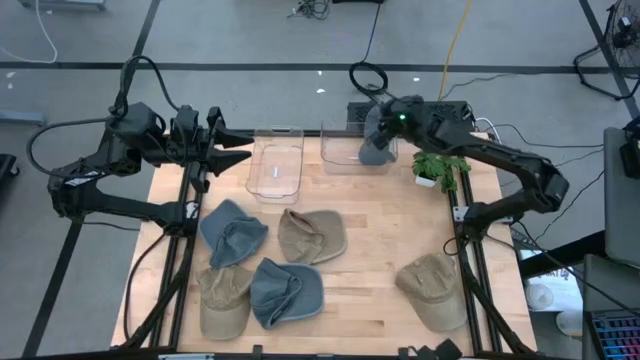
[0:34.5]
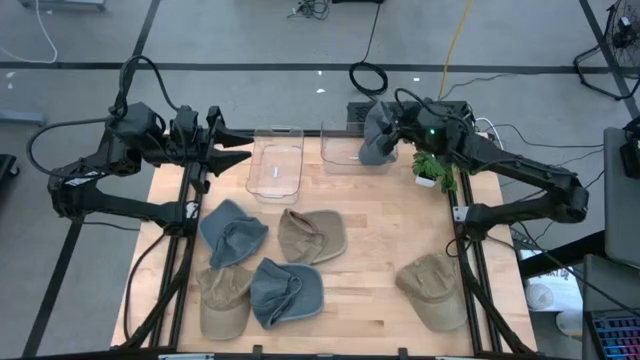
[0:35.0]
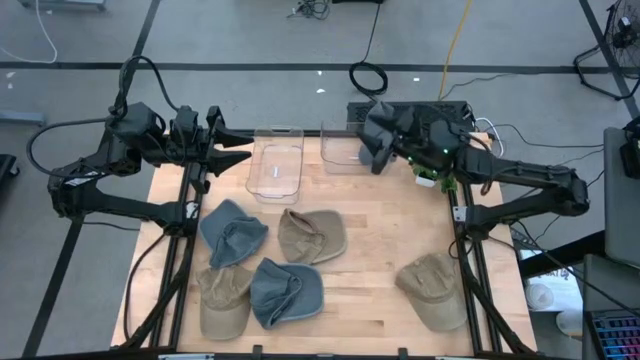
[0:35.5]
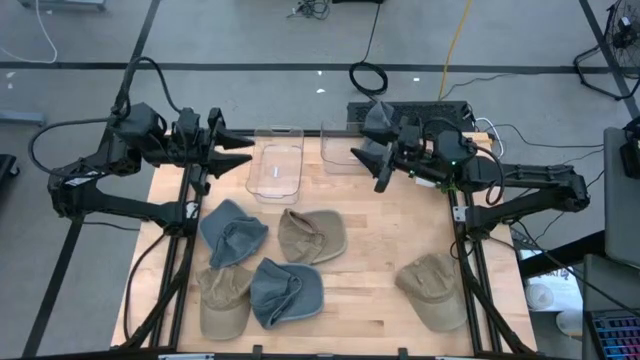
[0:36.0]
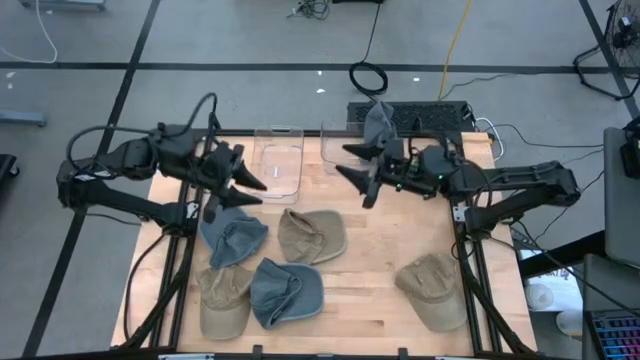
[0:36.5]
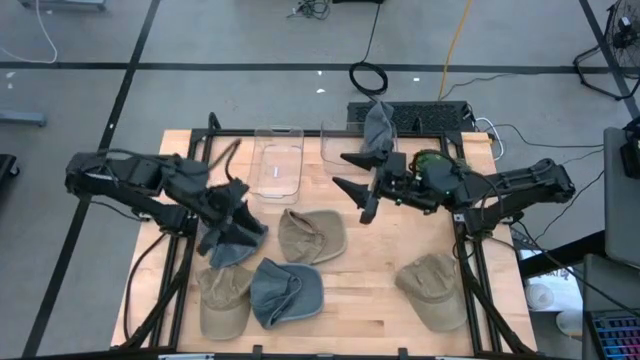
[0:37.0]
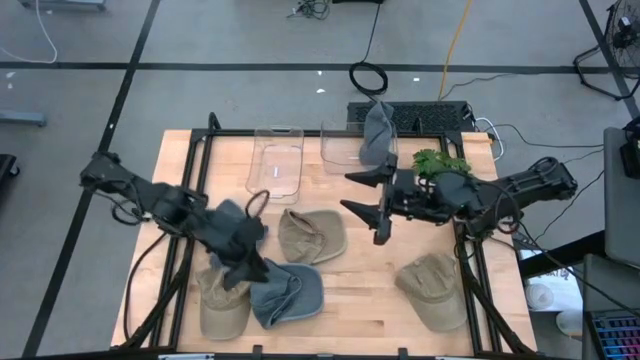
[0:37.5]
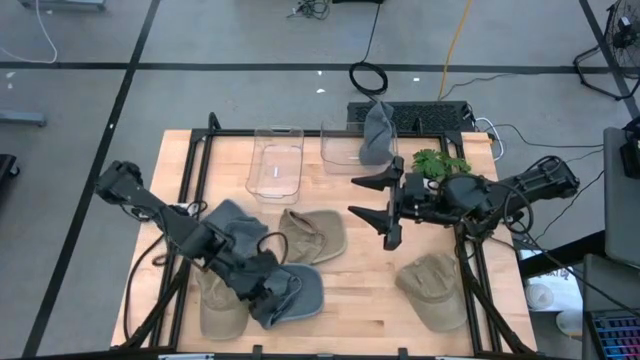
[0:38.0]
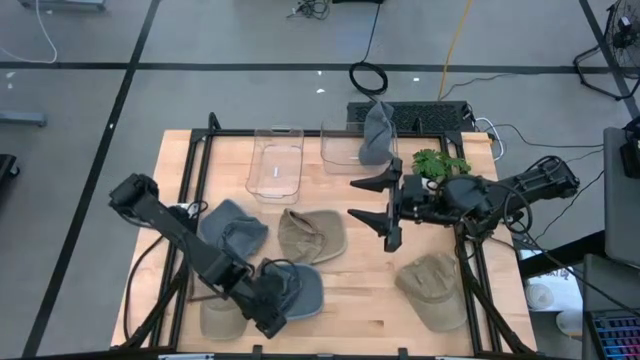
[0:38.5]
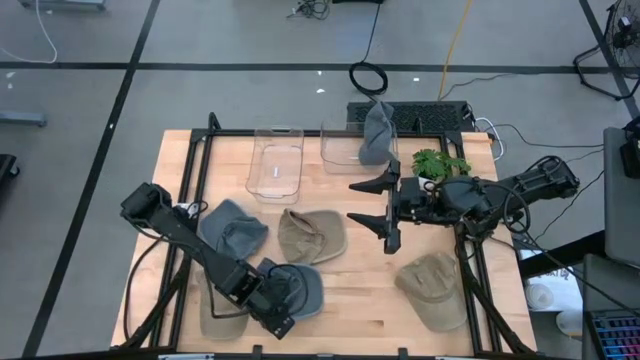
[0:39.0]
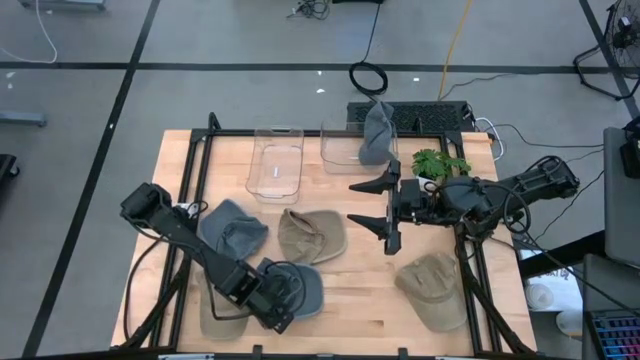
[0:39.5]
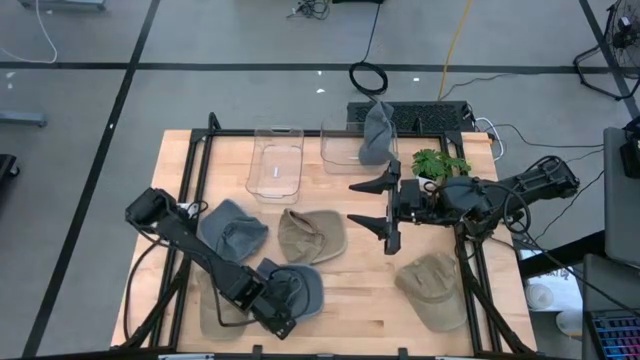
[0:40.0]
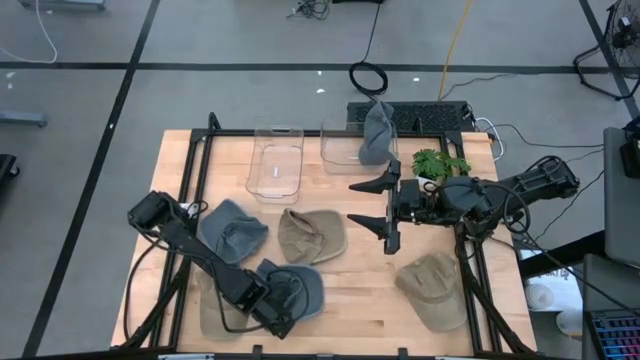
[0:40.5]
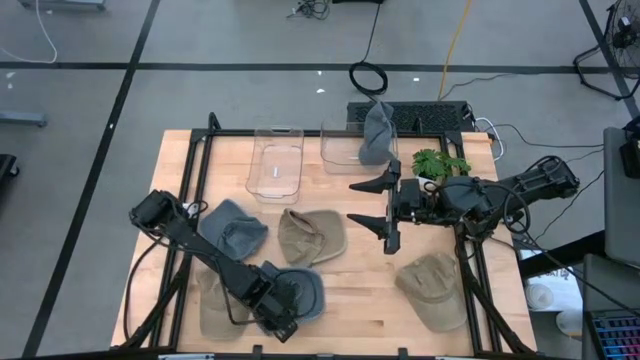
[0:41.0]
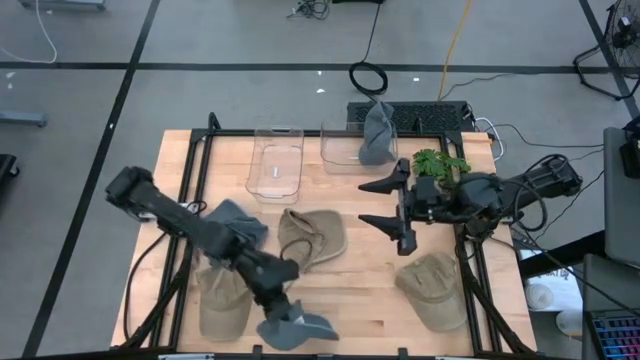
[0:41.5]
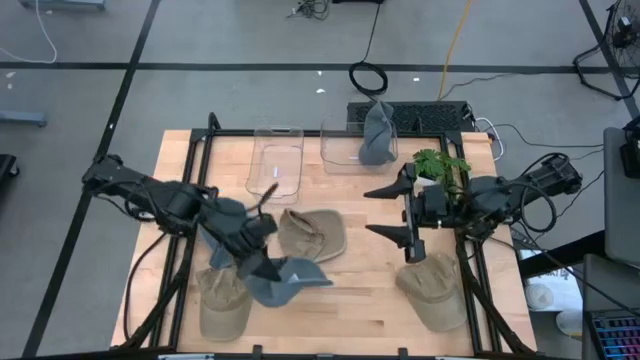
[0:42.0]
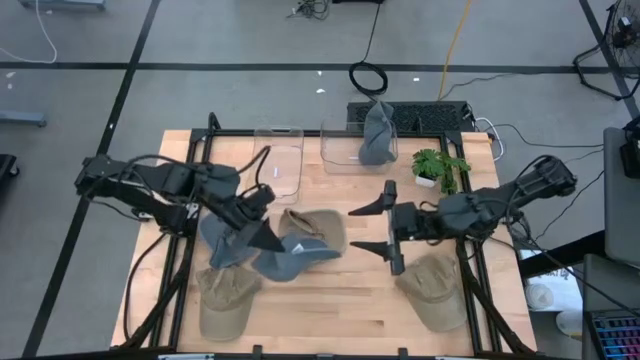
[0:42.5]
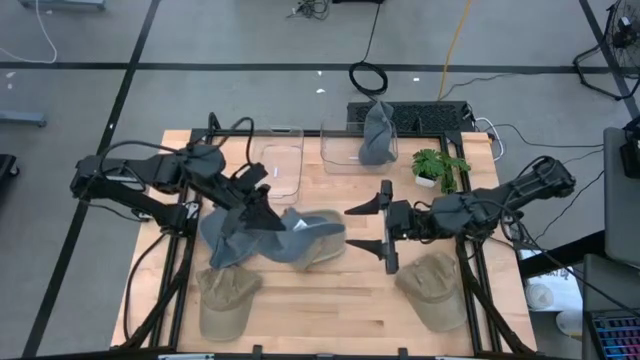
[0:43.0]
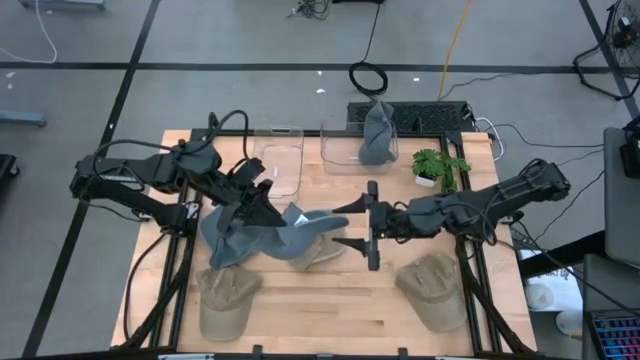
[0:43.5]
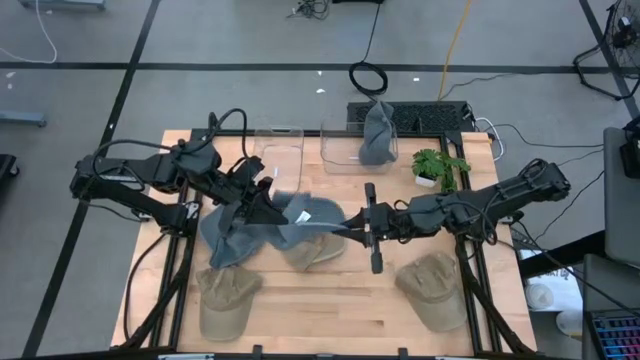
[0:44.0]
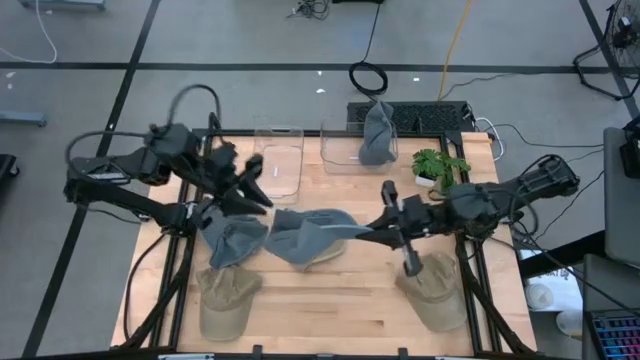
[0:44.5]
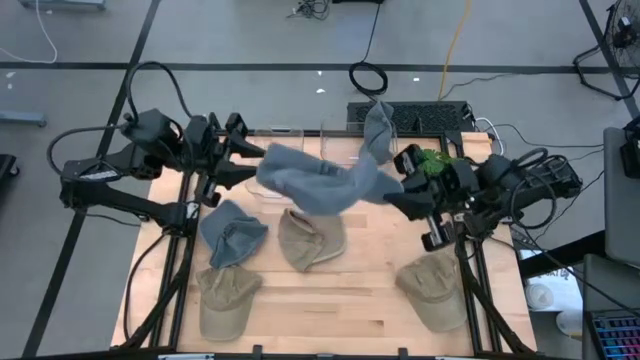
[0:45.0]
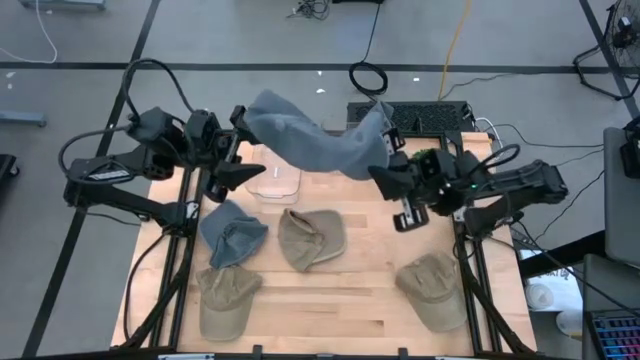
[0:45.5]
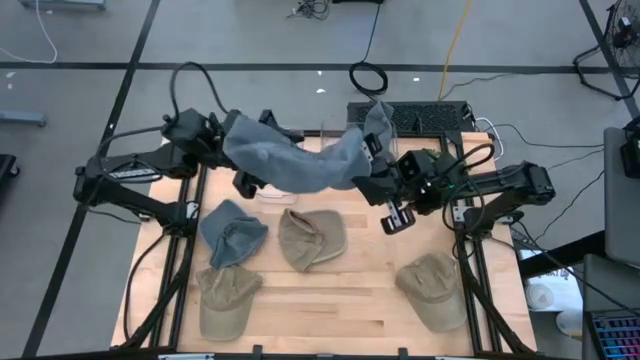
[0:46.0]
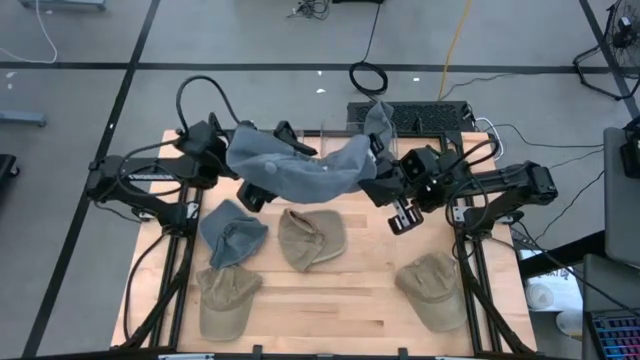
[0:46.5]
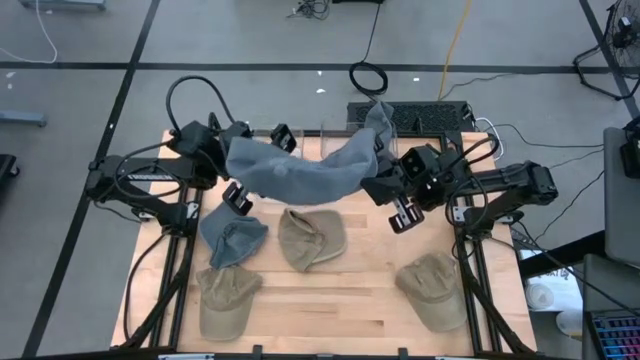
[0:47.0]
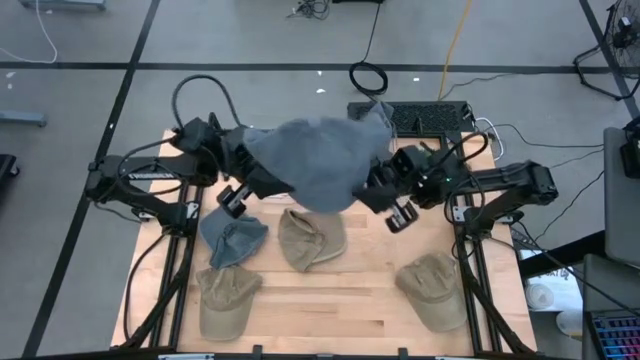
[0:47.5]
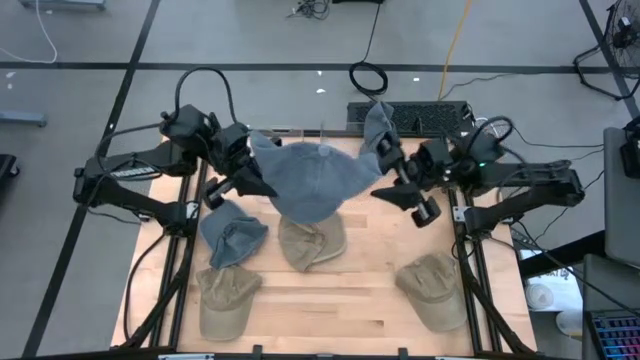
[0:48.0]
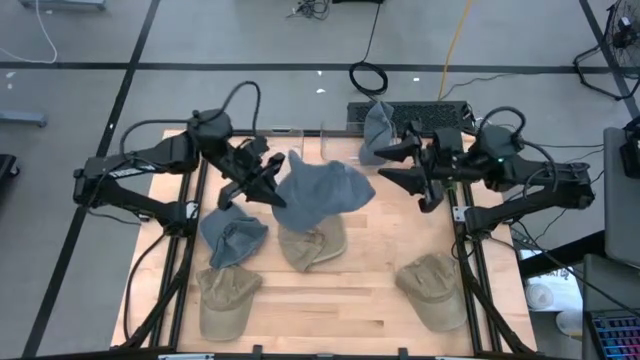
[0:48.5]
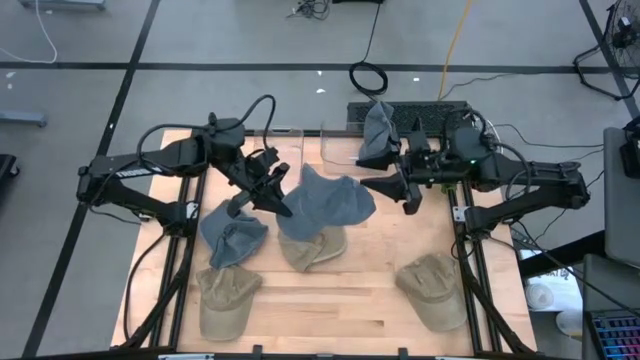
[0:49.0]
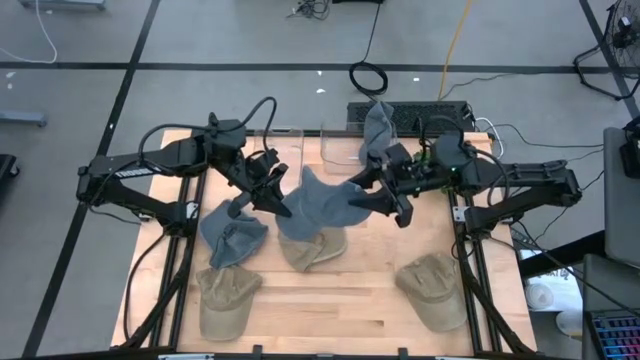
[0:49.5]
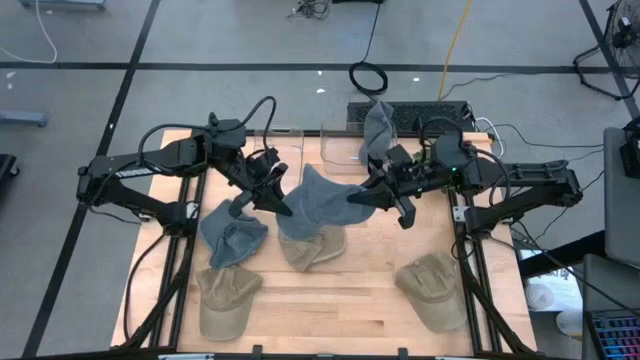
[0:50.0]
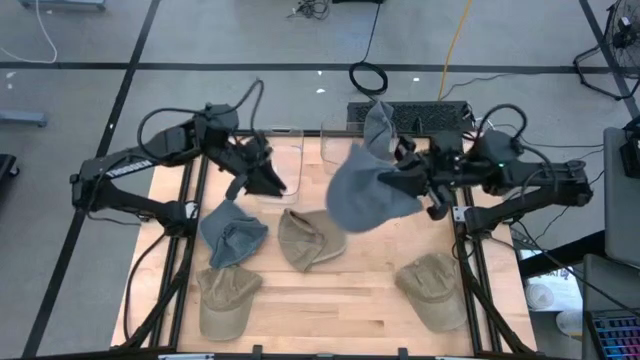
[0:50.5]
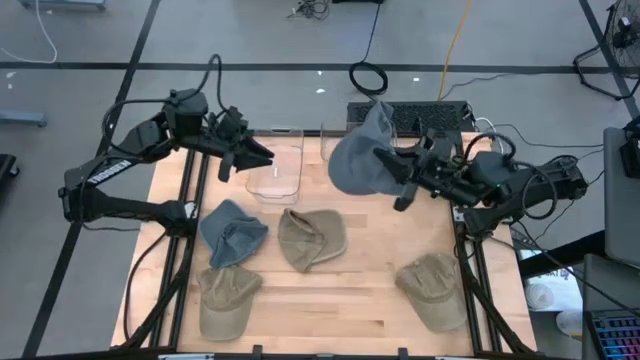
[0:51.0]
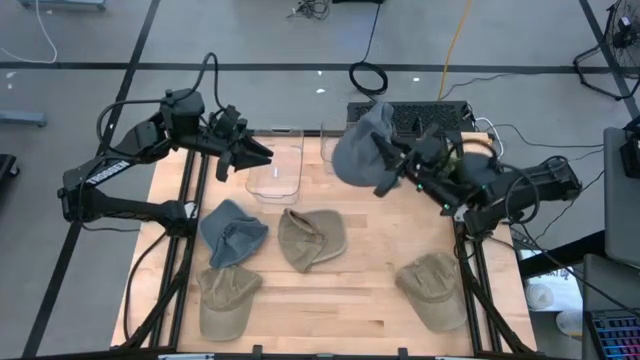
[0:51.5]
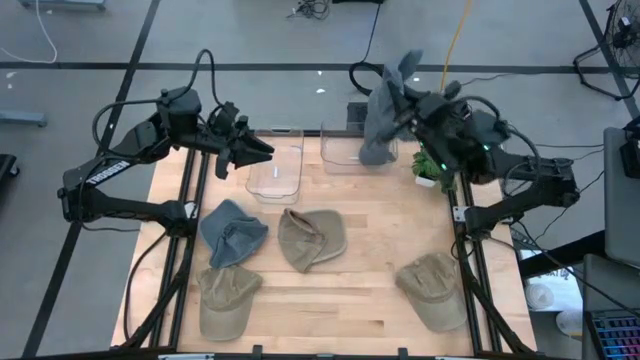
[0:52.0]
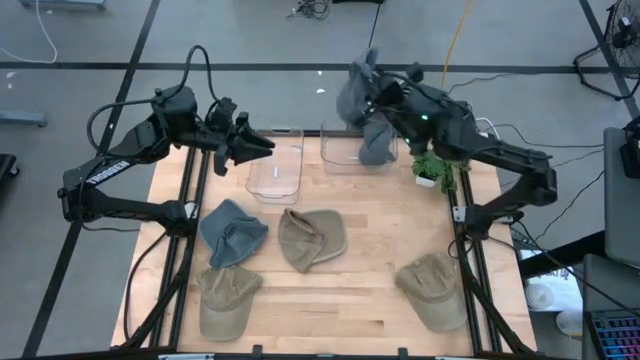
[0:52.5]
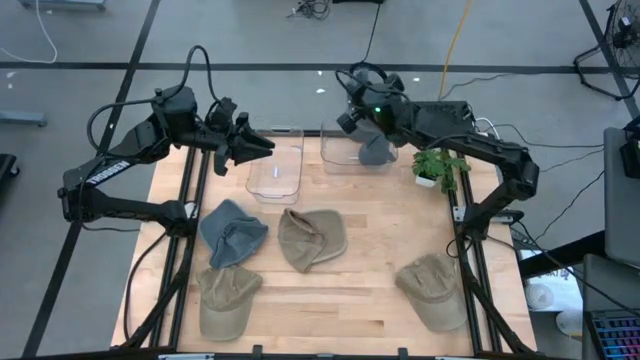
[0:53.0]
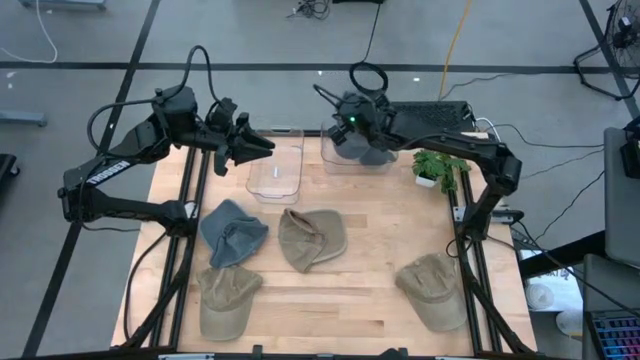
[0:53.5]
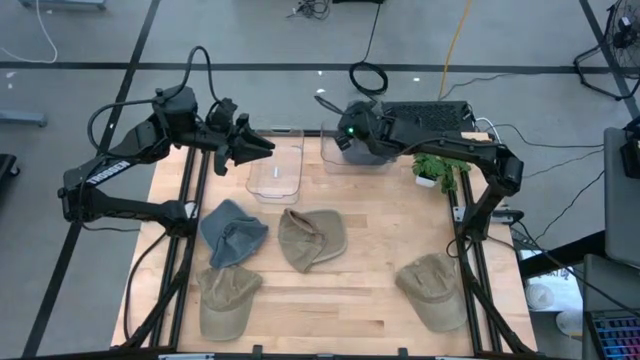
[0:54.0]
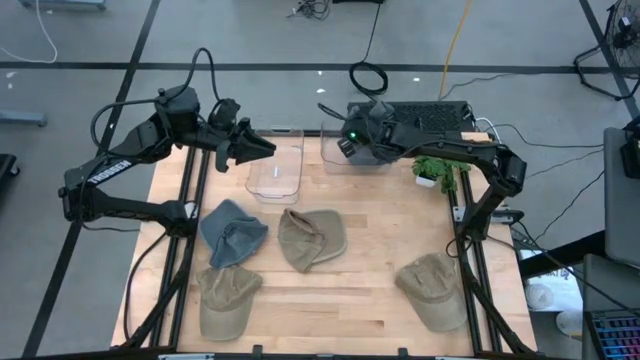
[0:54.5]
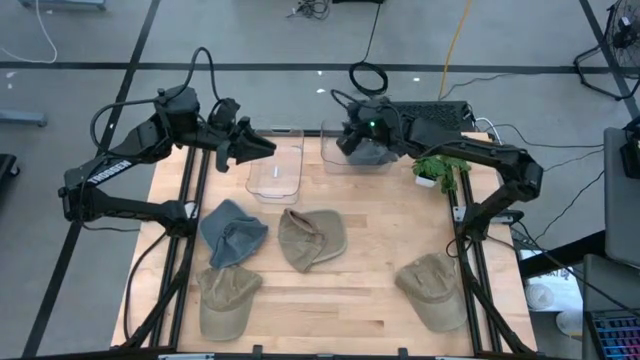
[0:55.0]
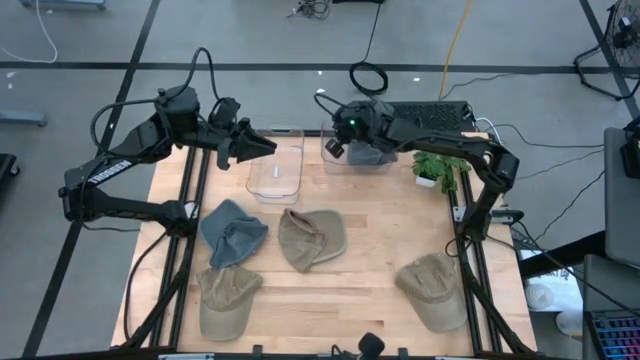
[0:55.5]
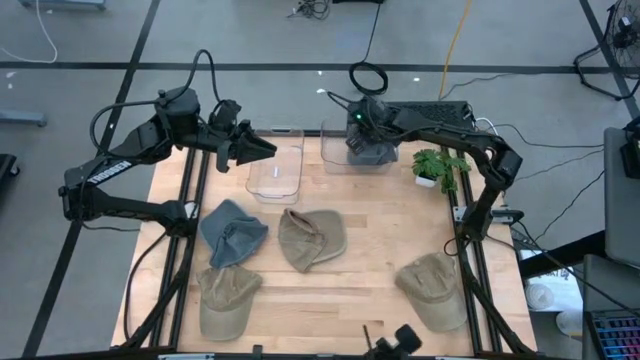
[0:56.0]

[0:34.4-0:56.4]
Task: Pick & Place hat
Put the bottom blue cap into the right transparent bin
